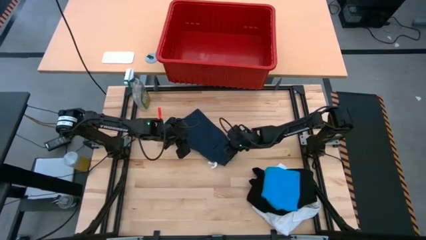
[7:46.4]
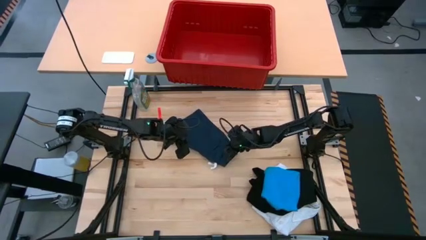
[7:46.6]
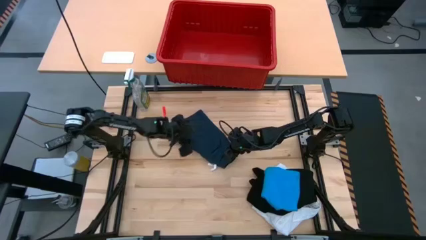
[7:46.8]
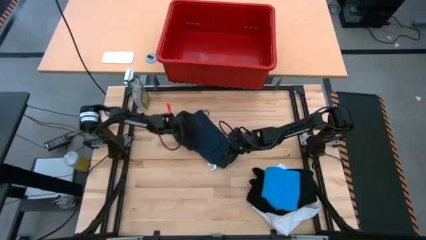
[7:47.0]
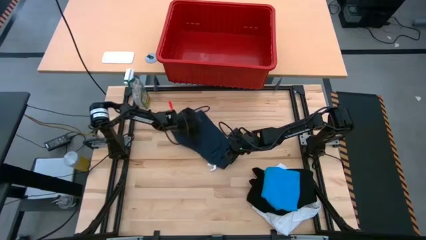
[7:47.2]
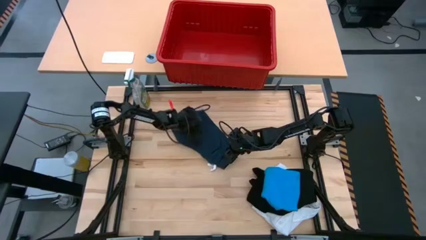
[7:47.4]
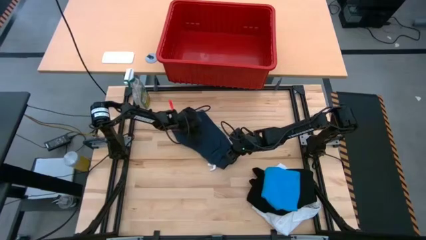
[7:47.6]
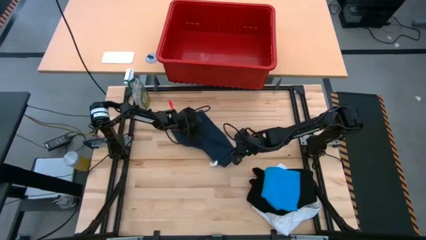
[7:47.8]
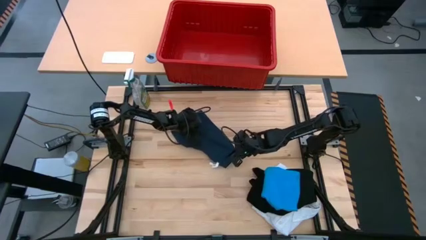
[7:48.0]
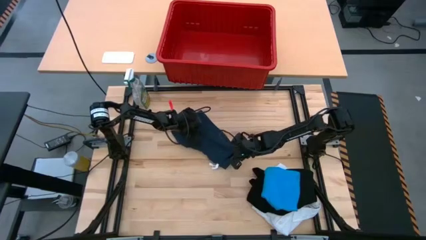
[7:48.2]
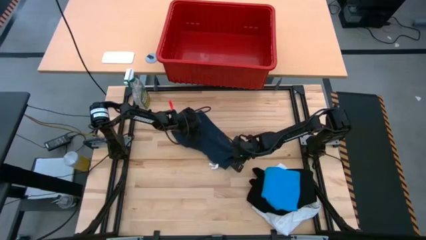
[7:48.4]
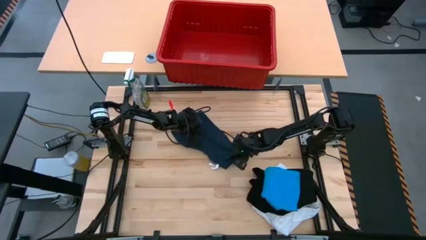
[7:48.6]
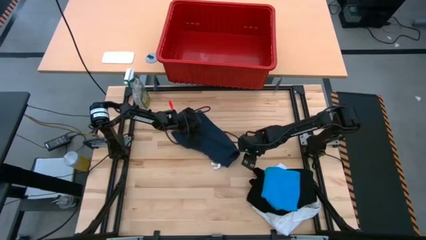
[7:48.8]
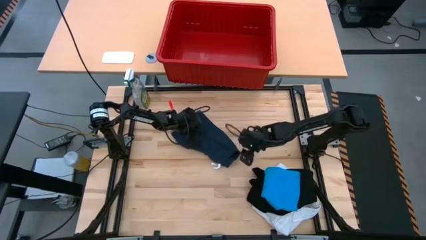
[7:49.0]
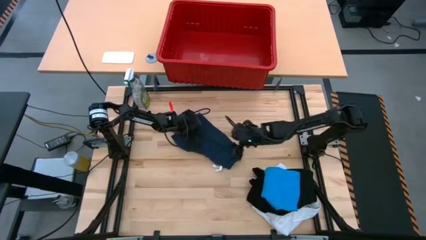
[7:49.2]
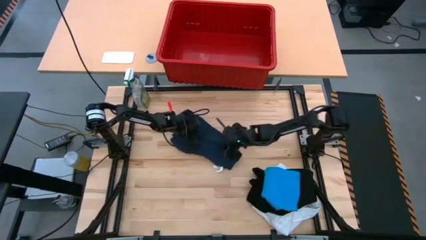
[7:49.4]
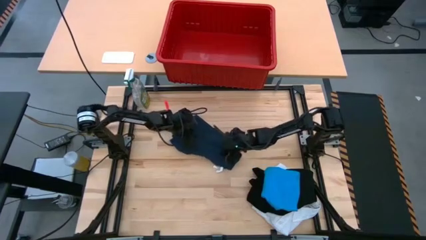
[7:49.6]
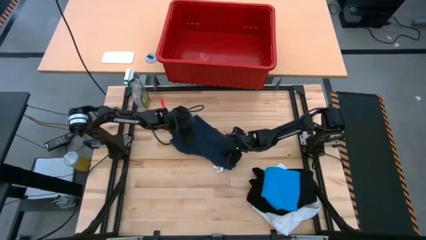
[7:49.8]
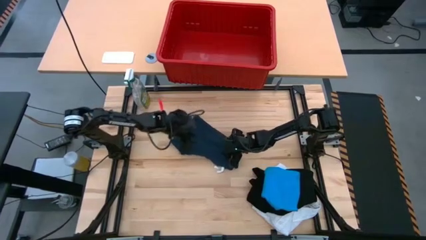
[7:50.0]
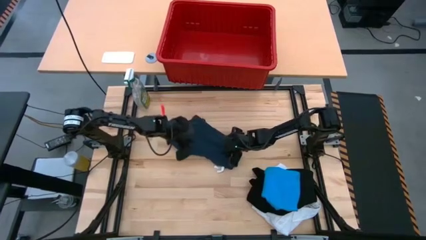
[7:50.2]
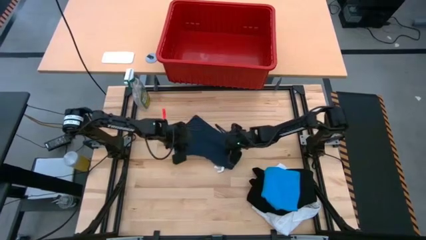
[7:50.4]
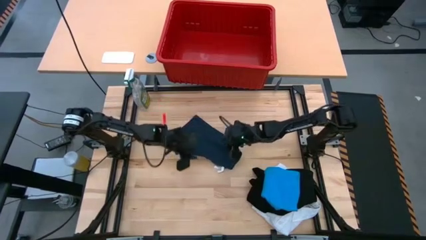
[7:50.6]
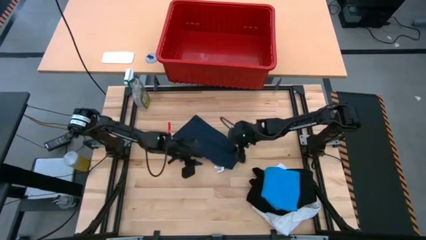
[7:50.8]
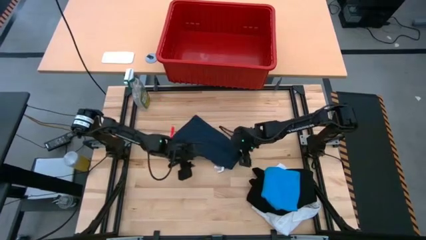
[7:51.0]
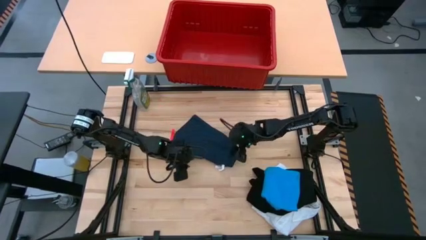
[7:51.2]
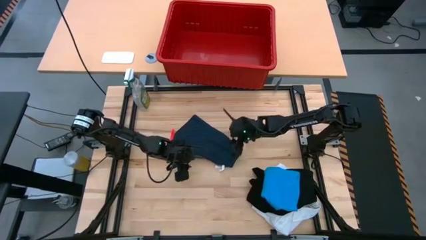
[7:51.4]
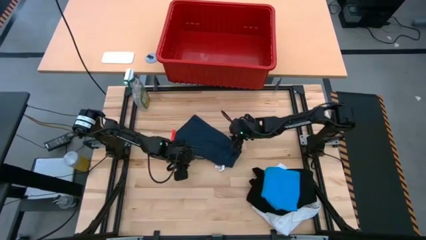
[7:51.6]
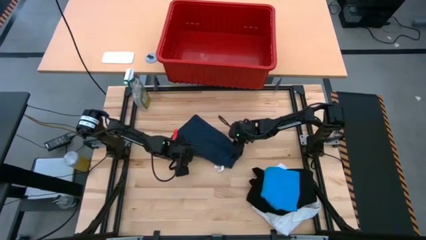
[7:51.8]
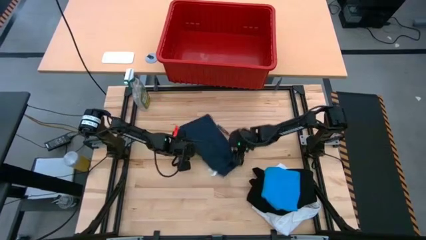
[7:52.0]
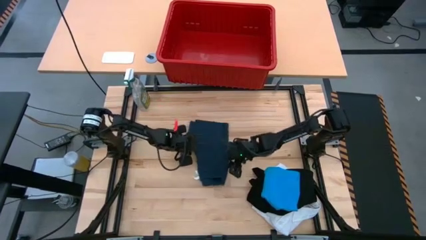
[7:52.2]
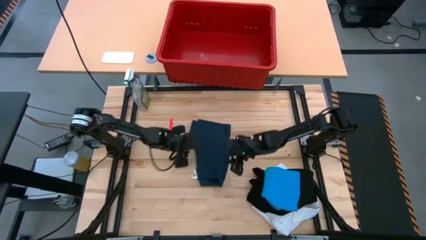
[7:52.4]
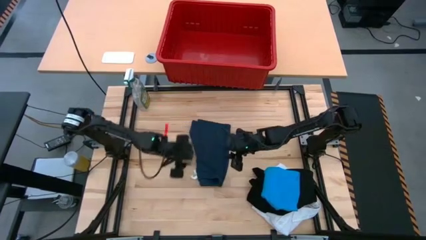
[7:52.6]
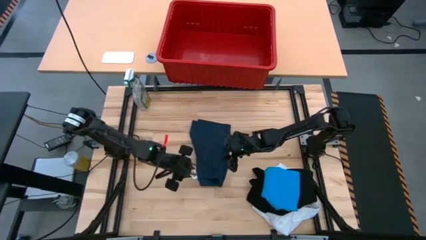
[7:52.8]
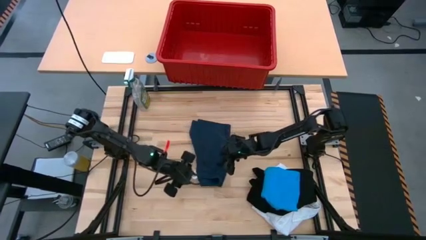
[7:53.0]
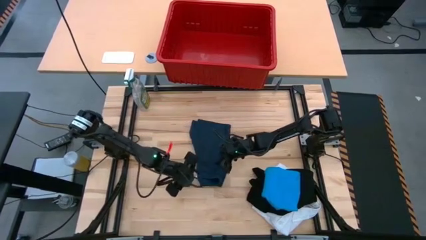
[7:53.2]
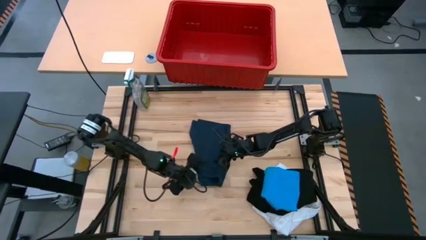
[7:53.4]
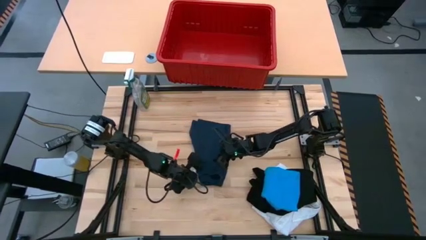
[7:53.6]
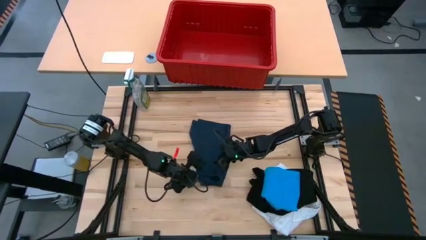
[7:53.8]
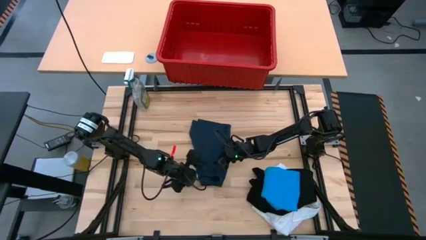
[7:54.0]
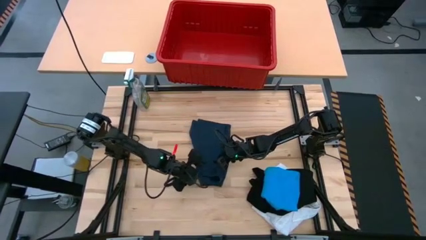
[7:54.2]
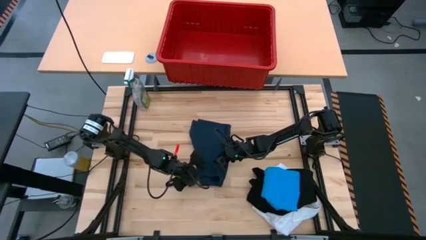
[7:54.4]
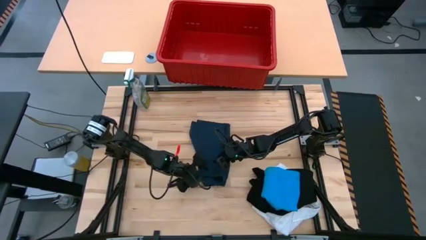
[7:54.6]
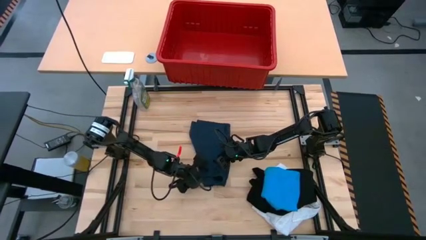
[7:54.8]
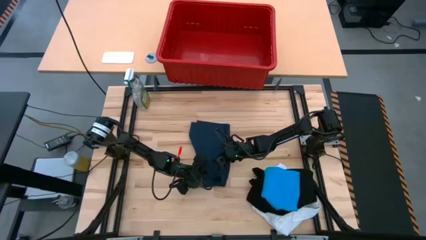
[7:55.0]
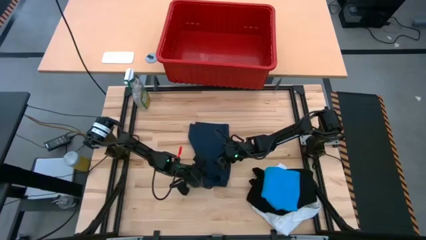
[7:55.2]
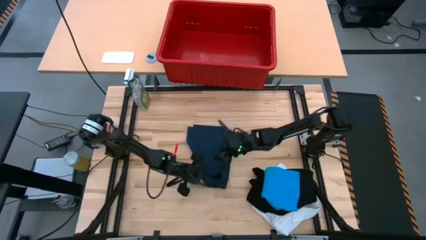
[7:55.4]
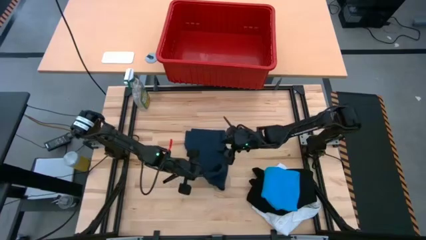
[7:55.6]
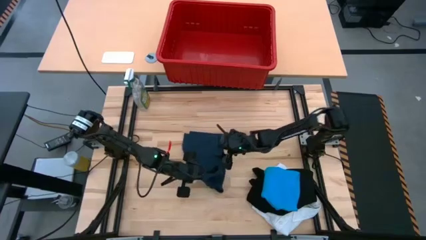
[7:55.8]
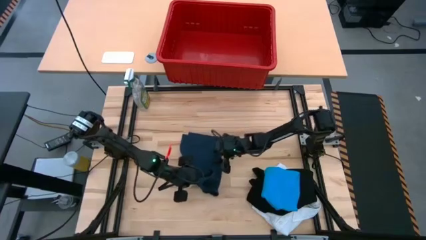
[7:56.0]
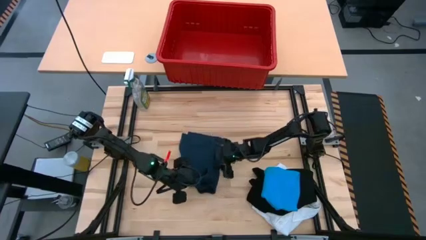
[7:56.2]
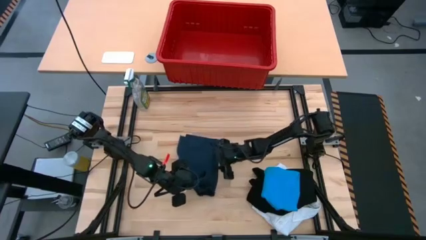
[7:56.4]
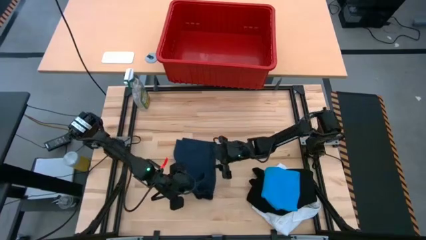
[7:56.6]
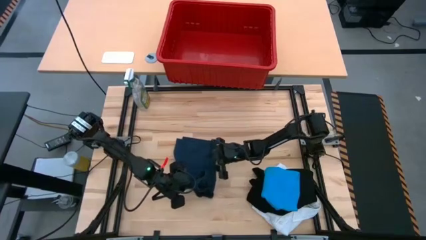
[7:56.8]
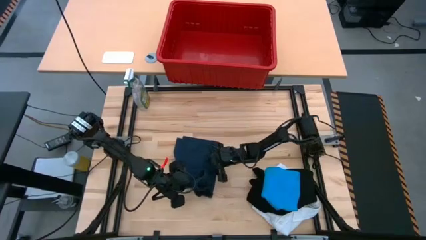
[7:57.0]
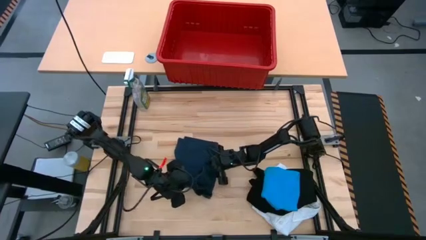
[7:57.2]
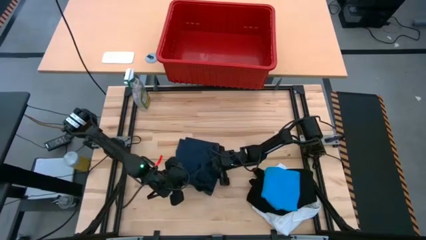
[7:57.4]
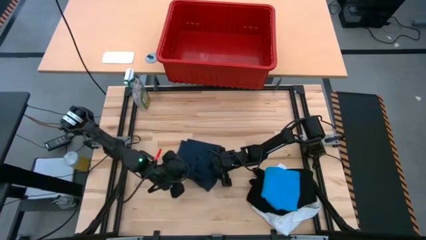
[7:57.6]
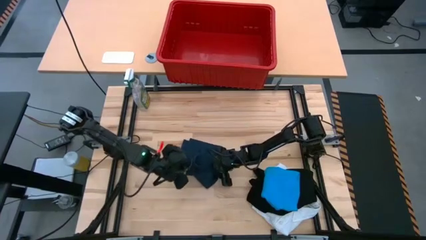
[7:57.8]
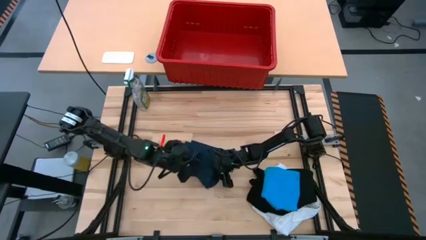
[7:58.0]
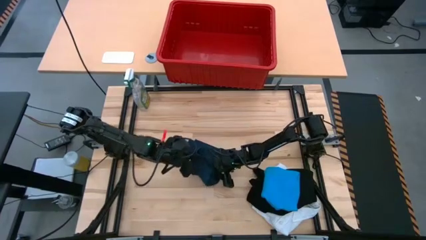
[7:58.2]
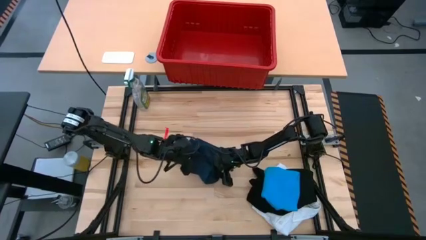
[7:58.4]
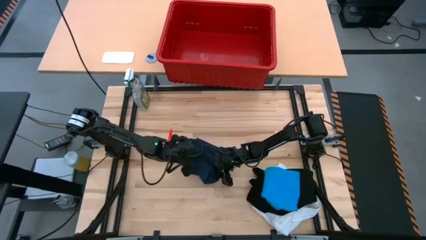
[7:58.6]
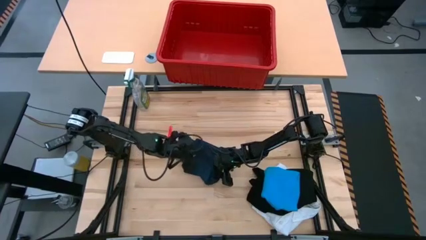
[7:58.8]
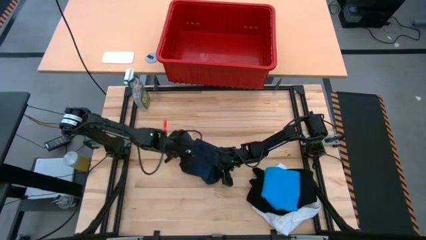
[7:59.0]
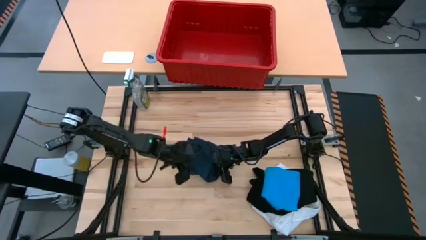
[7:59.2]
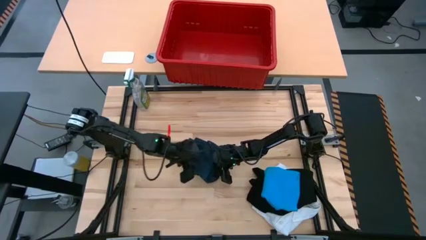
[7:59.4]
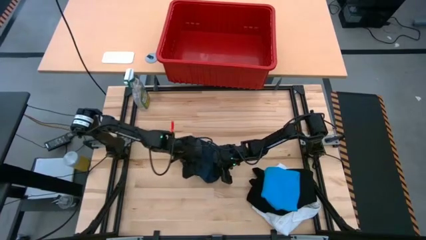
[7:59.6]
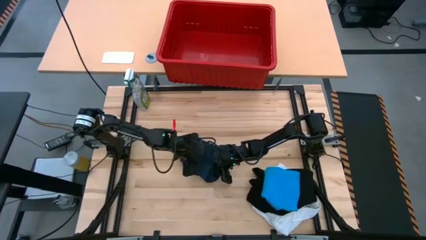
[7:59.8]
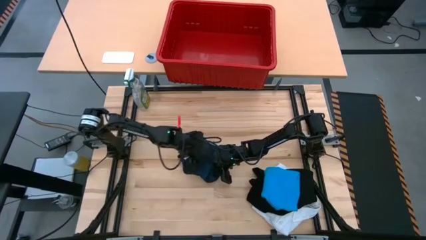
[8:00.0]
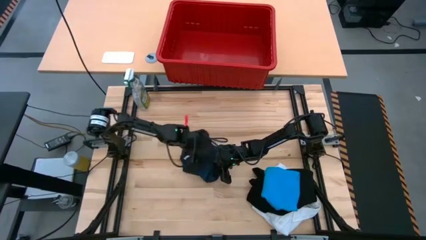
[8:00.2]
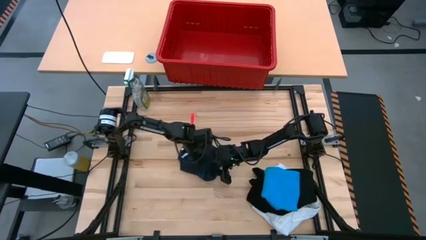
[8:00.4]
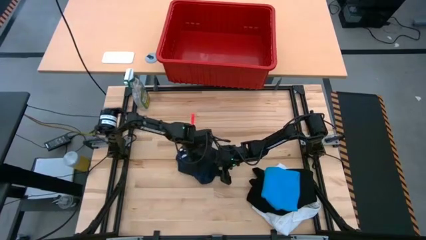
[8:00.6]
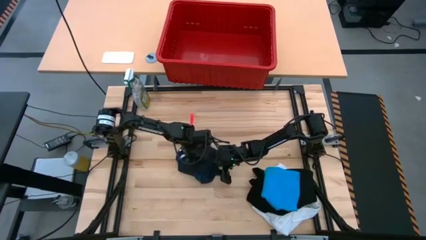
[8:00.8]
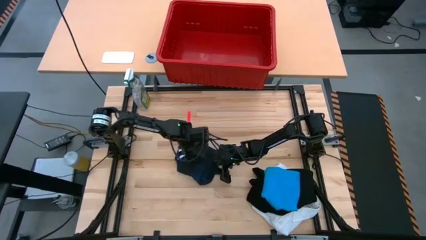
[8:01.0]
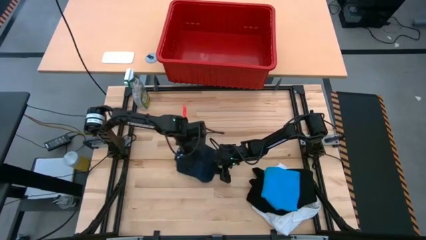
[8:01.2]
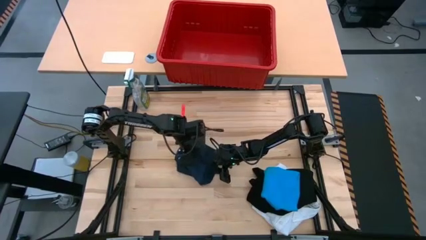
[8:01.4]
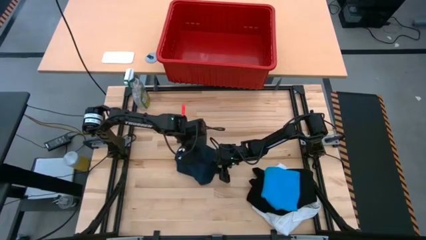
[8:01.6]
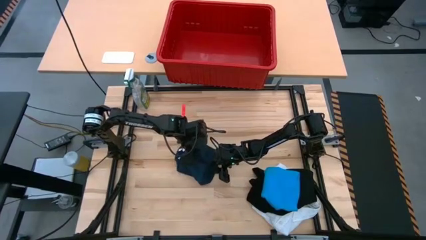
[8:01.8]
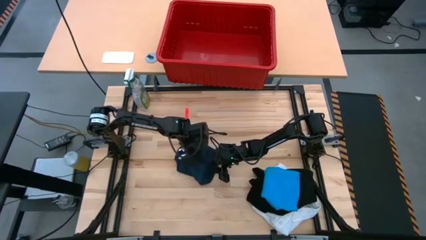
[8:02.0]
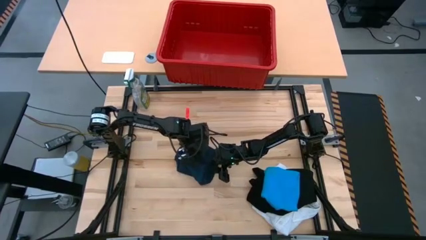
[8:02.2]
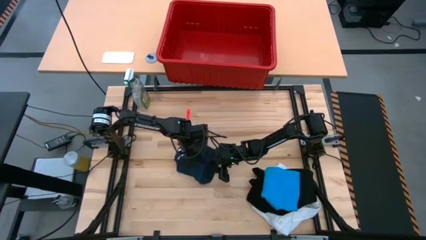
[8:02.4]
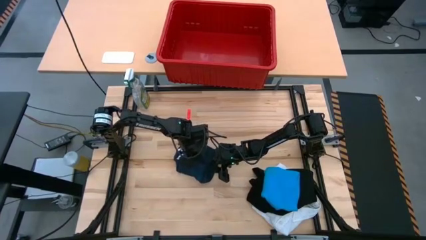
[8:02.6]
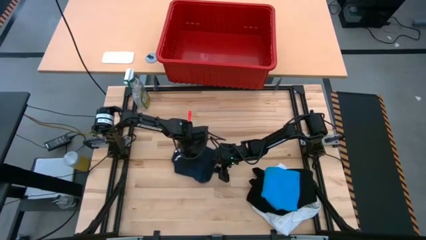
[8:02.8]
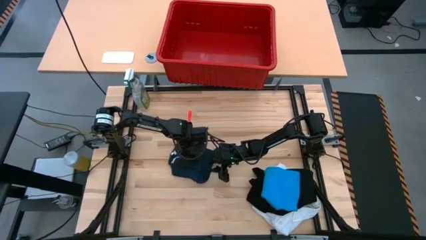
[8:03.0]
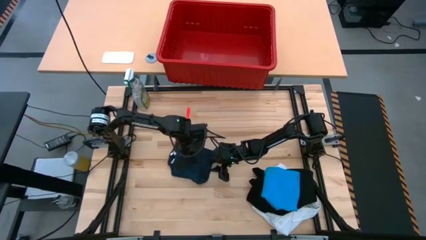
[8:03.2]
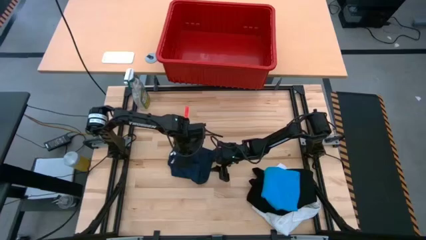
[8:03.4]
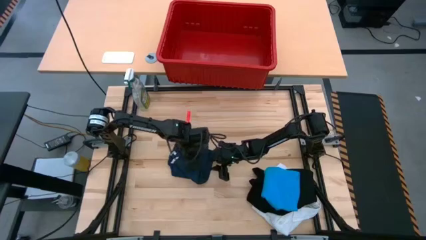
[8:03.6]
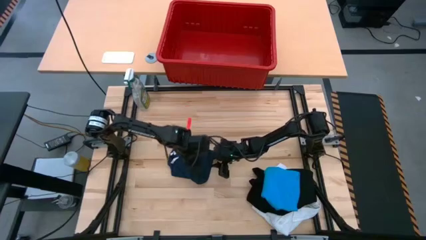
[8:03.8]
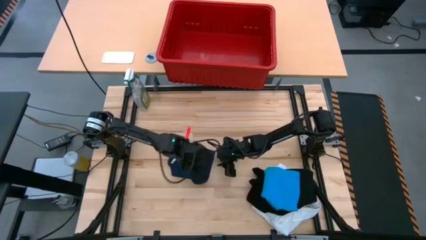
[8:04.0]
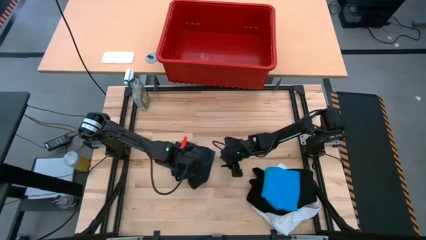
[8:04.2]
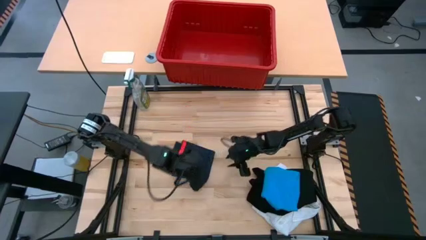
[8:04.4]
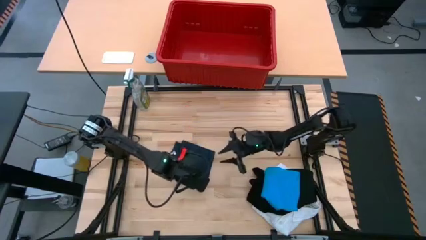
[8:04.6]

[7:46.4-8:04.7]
Task: Fold laundry
Fold the dark blue shorts
